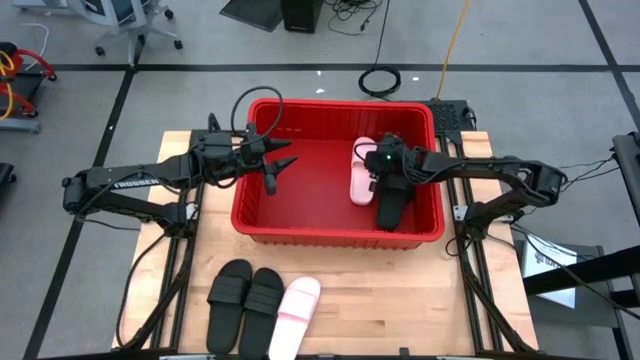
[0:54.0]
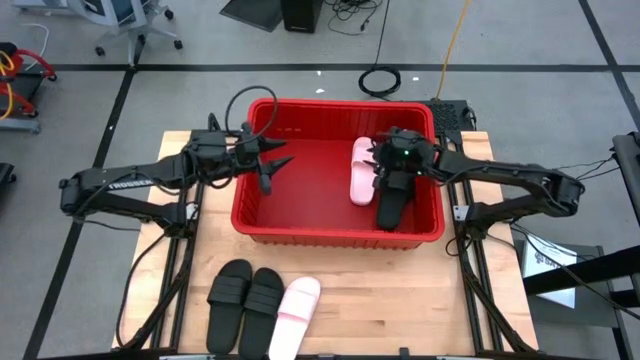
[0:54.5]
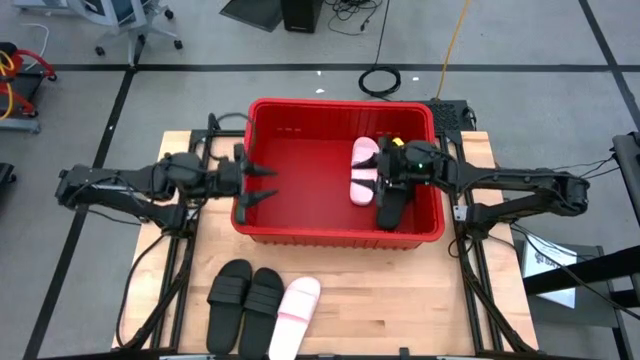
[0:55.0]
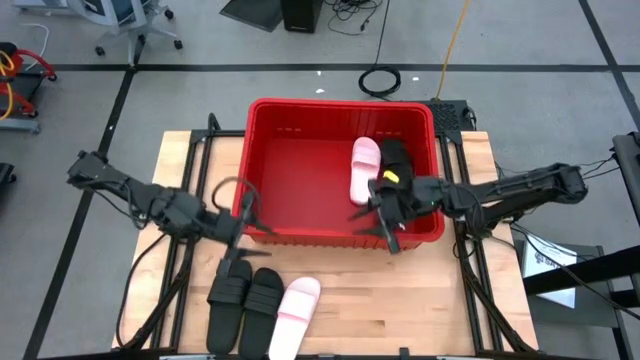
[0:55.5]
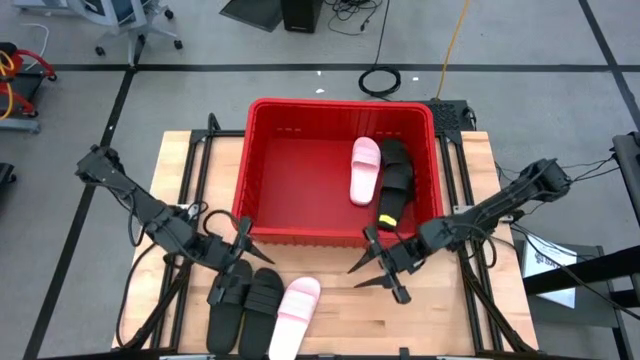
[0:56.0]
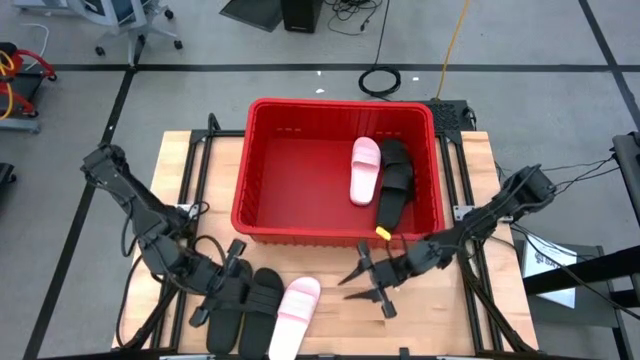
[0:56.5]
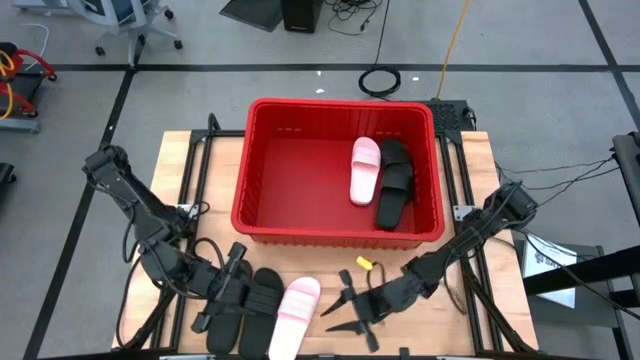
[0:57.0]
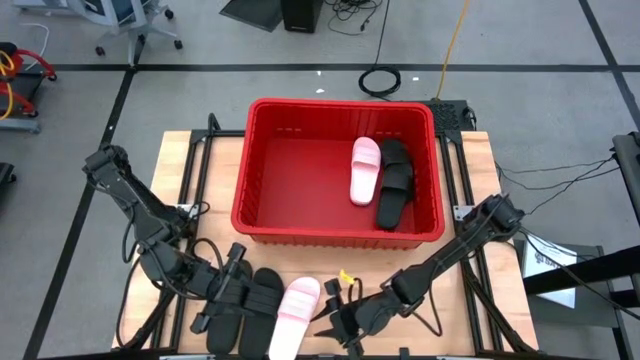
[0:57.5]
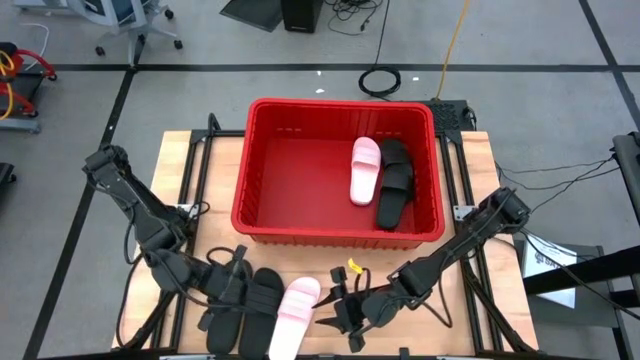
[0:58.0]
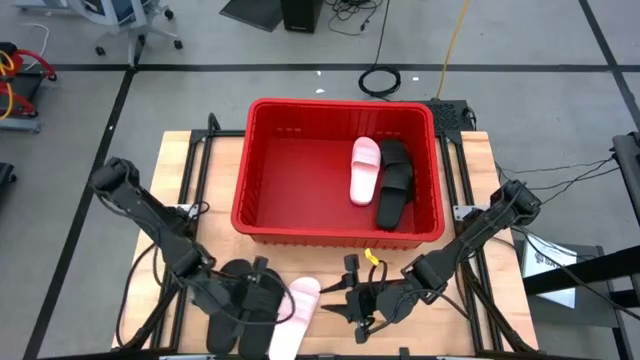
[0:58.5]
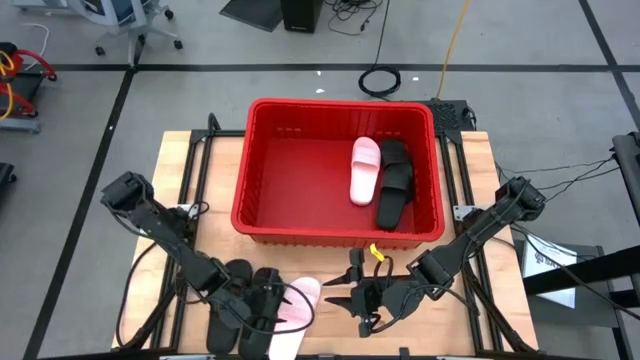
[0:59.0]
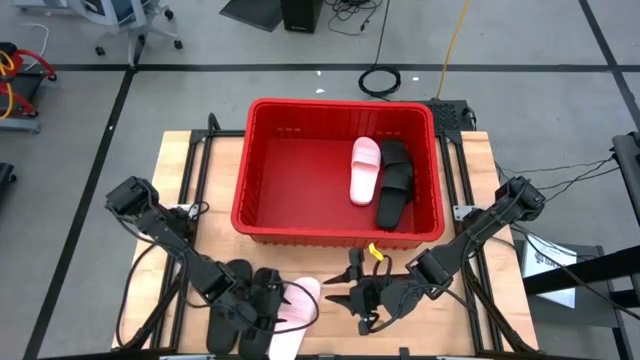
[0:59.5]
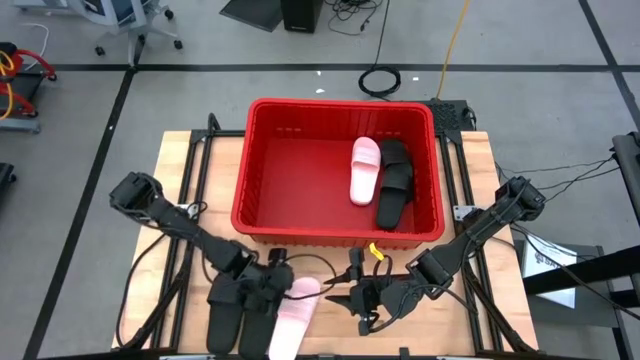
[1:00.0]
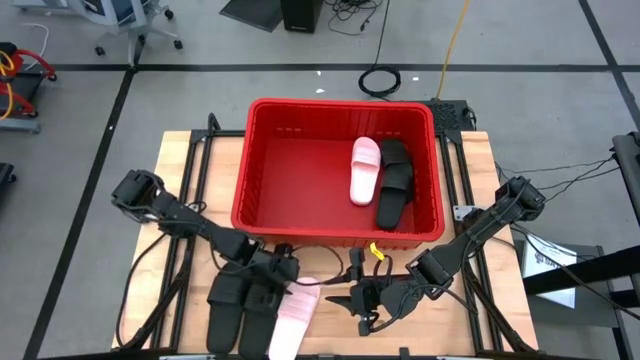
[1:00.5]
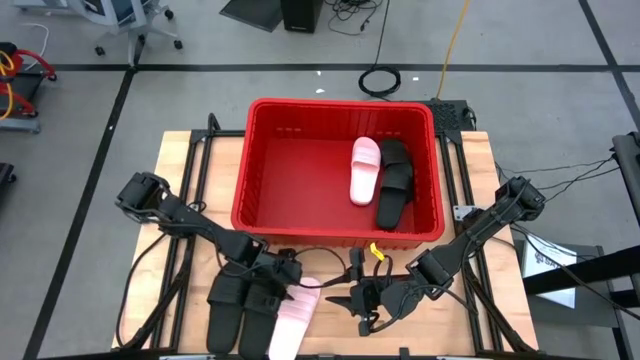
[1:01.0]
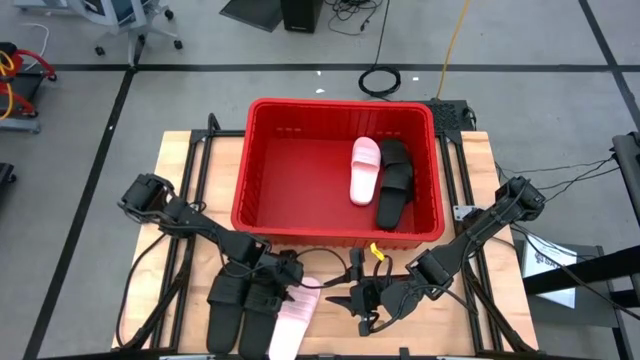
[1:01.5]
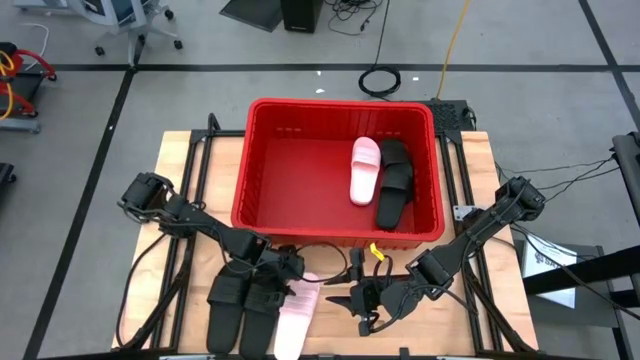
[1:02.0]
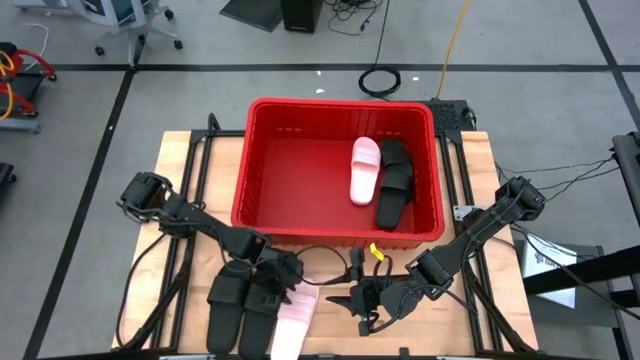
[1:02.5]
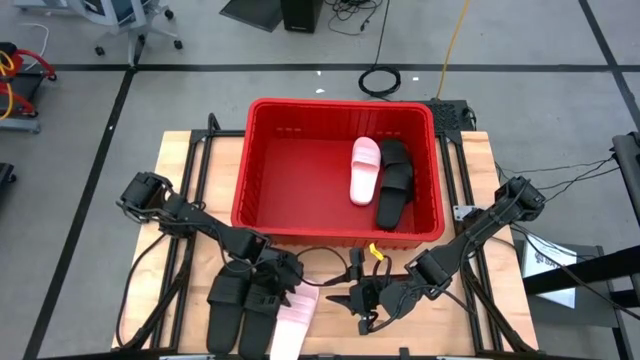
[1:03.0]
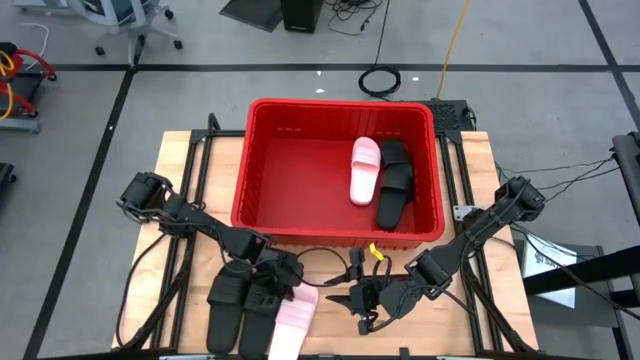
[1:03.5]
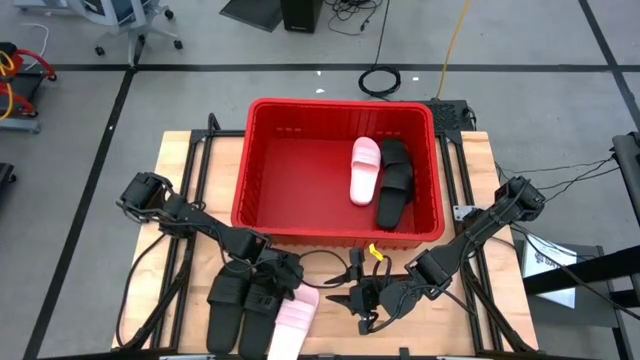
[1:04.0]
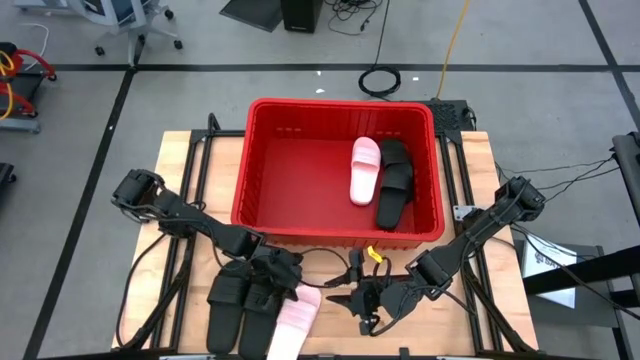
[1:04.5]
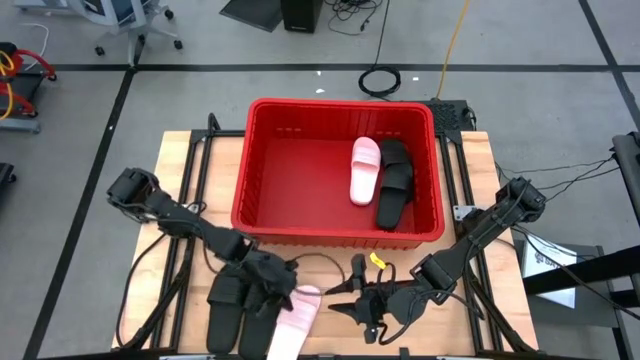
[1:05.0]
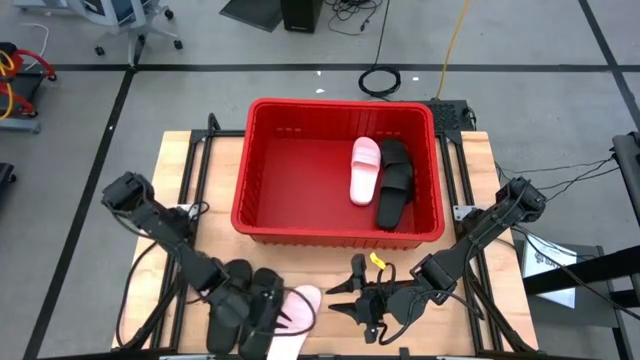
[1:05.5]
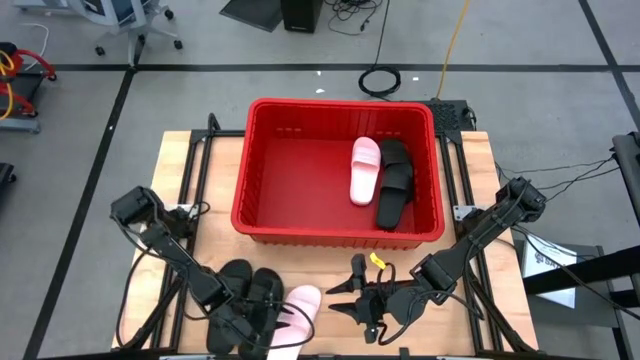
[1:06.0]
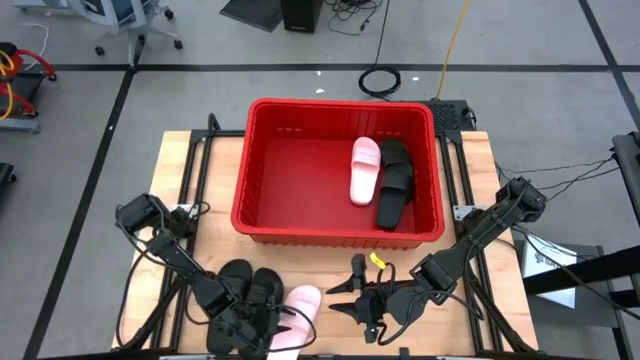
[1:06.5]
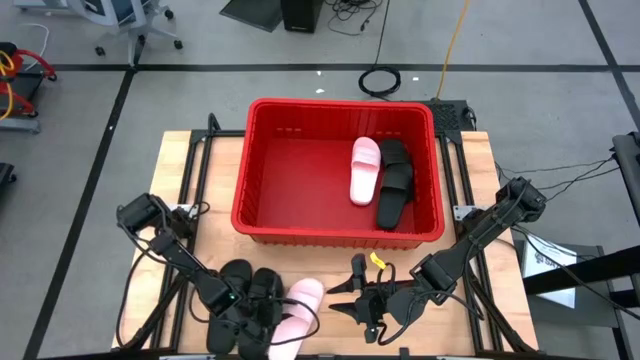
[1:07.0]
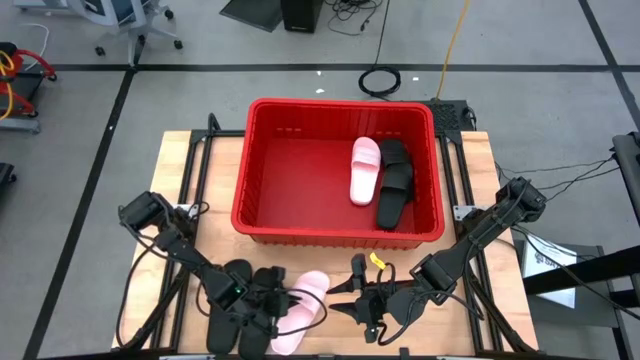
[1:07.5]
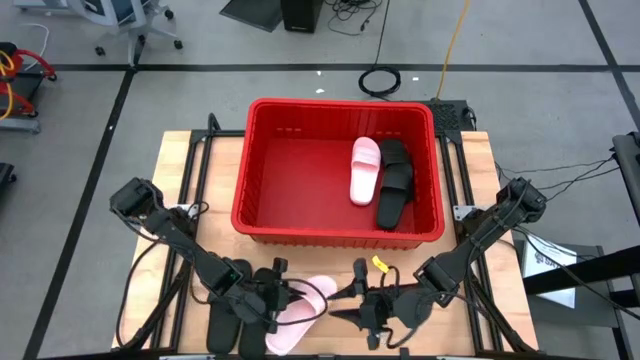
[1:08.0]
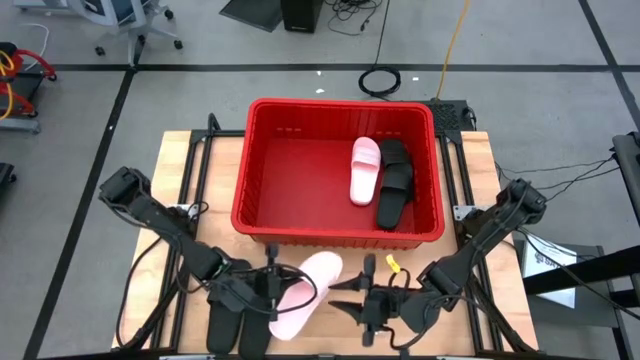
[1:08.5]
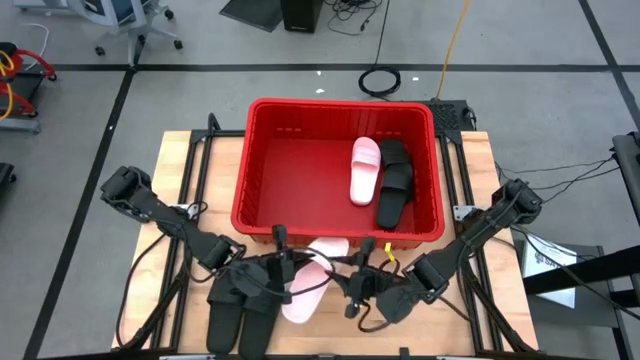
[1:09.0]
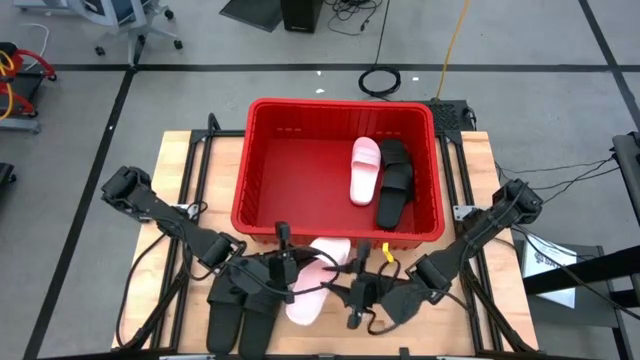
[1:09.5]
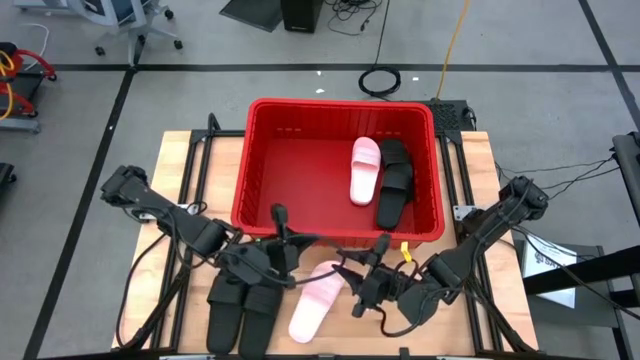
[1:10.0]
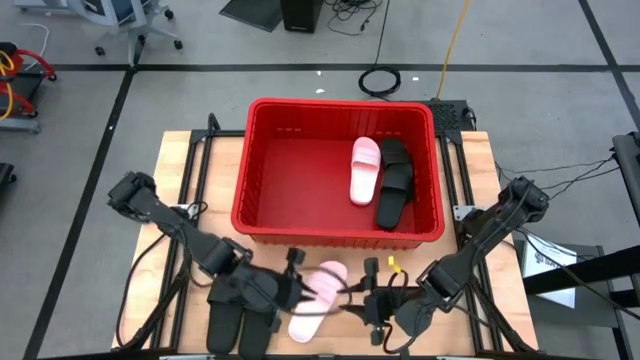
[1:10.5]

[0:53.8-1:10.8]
Task: Pick and place slides into bin
Put the pink slide into the red bin
